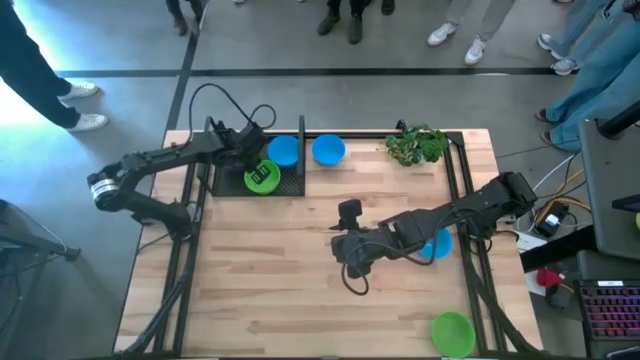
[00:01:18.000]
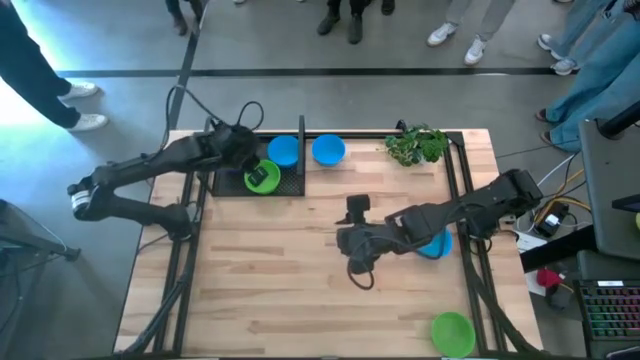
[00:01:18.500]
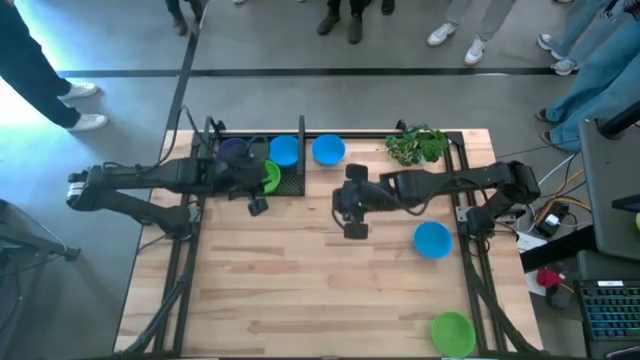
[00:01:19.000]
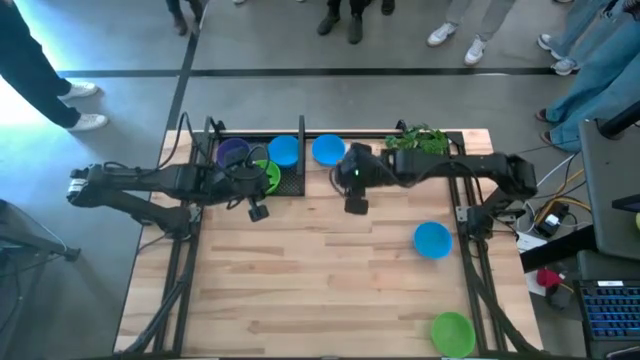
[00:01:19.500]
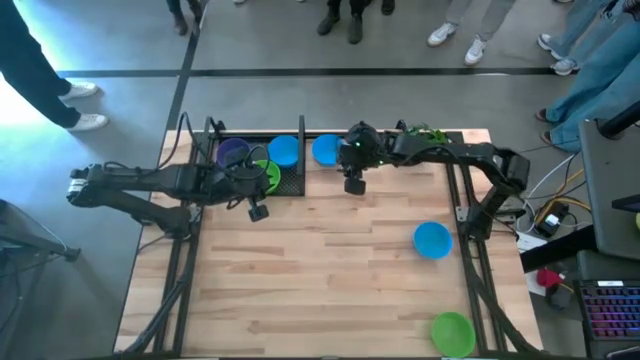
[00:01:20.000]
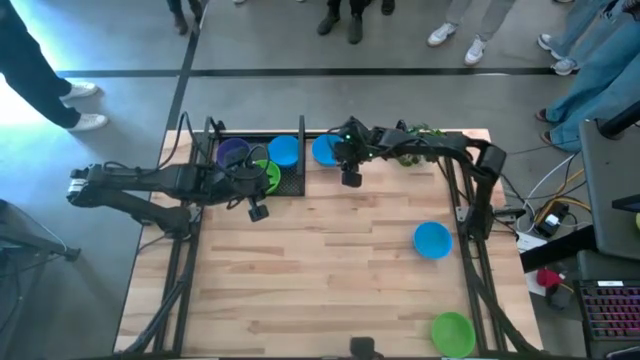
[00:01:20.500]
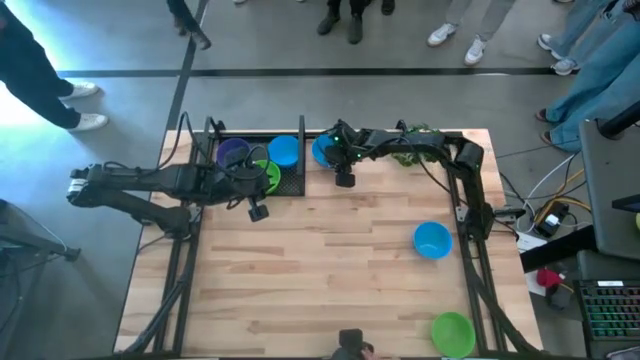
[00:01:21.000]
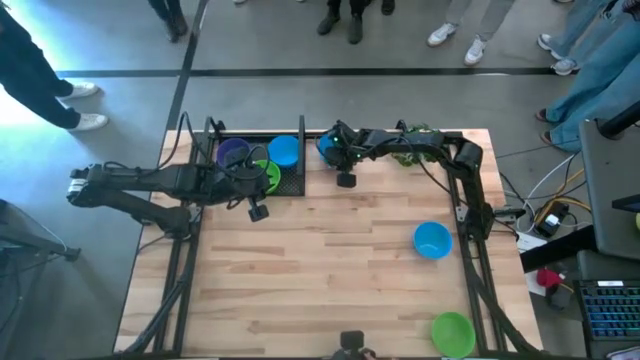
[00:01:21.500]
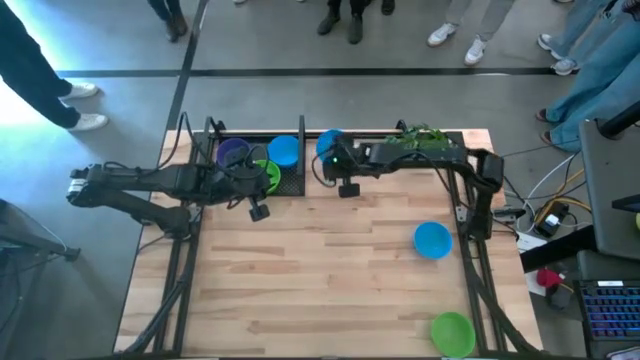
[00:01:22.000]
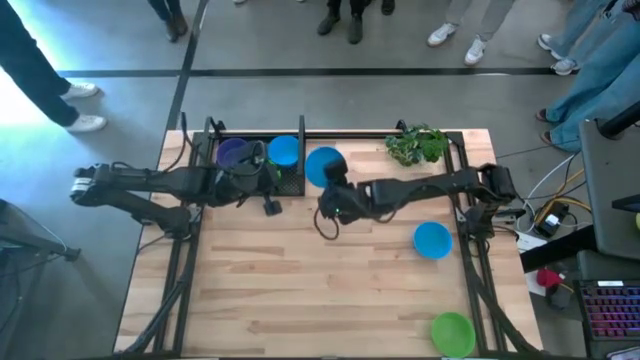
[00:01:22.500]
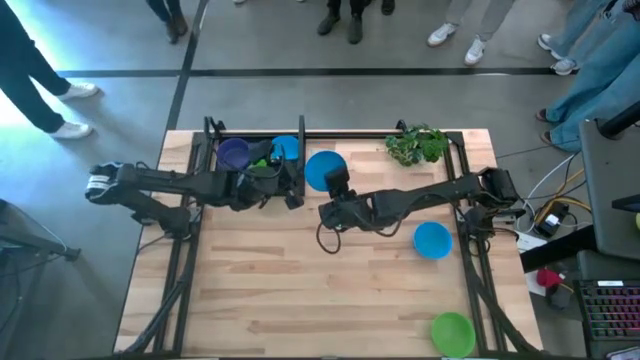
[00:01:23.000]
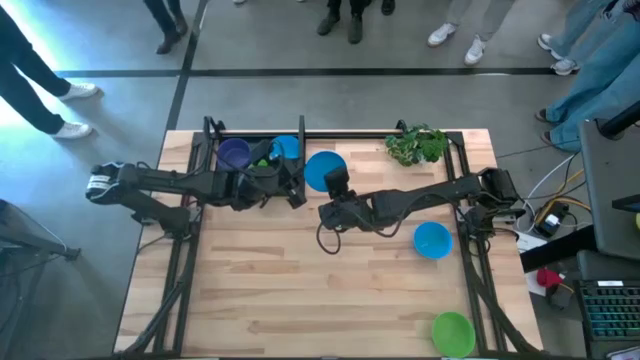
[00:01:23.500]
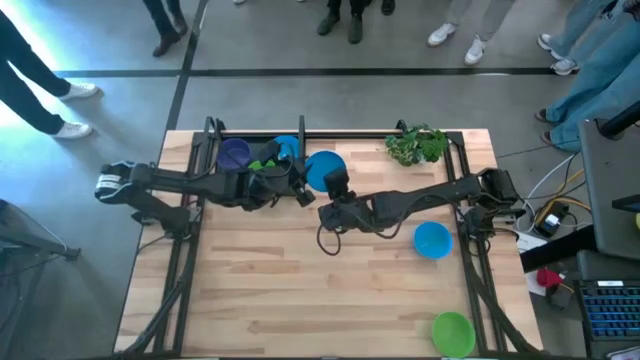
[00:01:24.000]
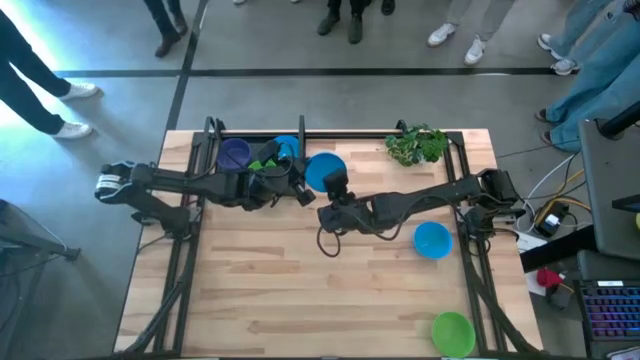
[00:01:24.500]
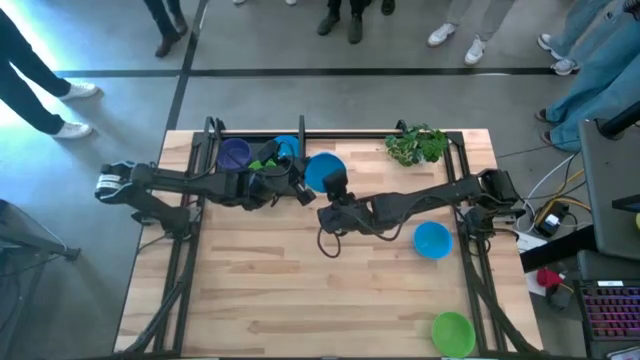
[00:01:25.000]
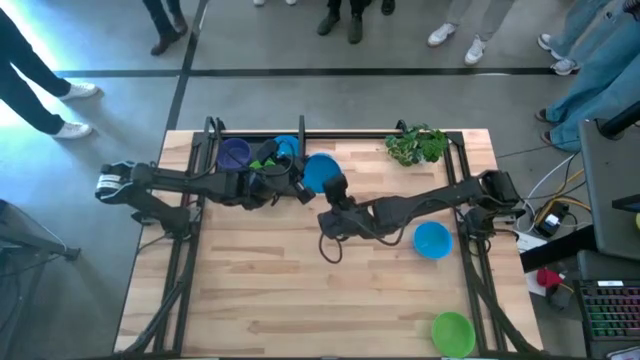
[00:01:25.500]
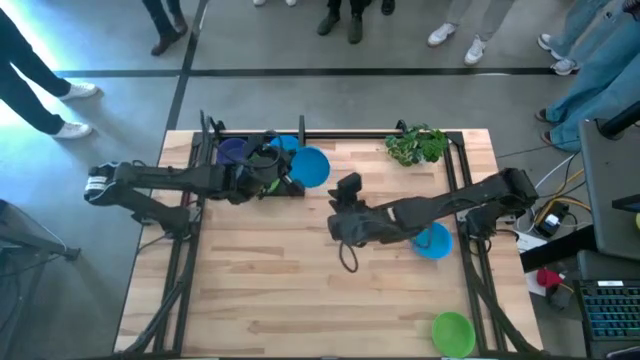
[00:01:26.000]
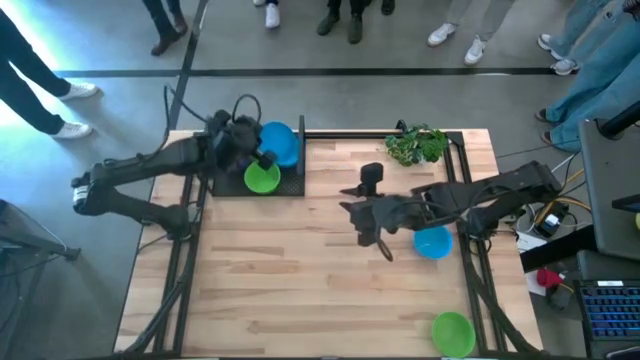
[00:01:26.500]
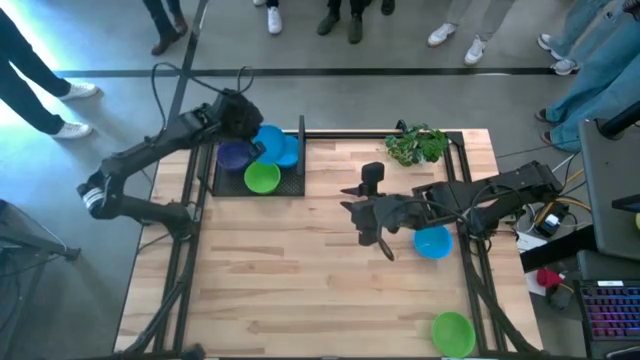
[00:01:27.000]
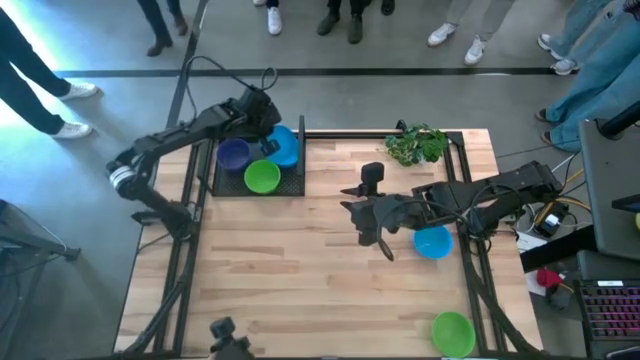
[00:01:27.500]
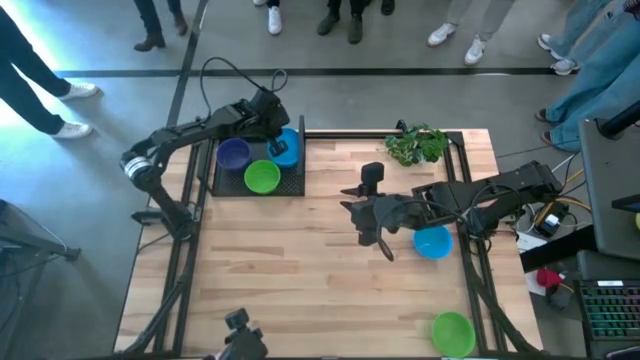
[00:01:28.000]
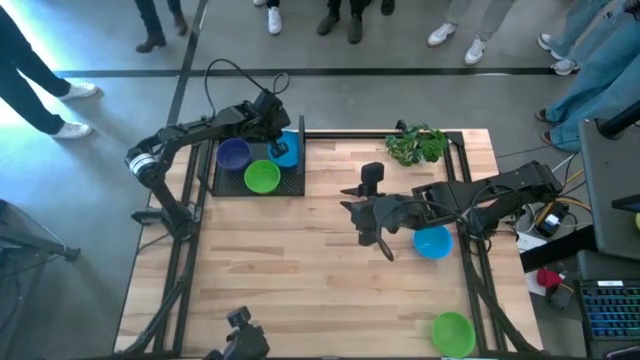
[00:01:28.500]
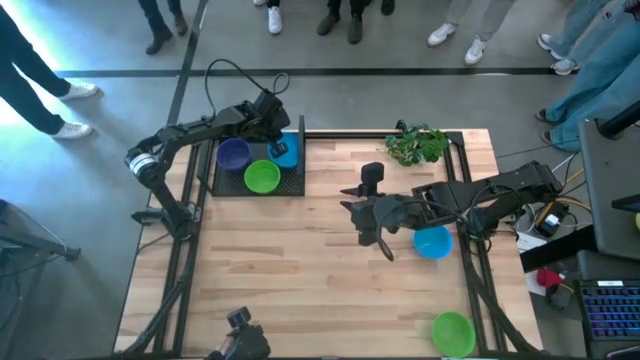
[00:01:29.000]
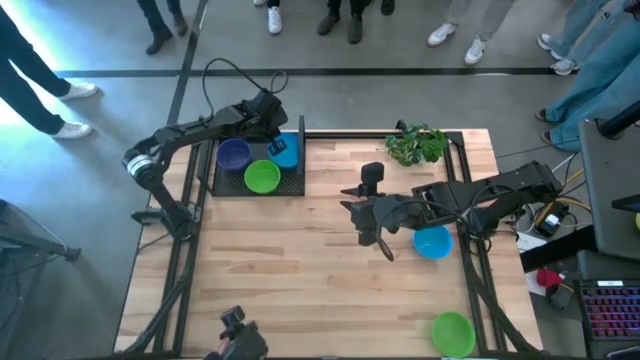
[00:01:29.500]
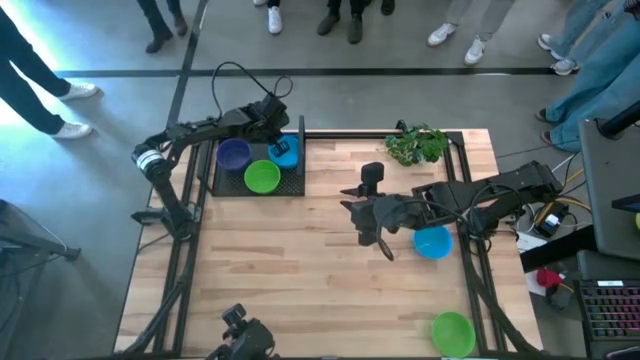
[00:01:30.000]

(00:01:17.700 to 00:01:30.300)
Task: Pick & Place Mini bowls
Stack the top blue bowl on the blue bowl on the shelf
